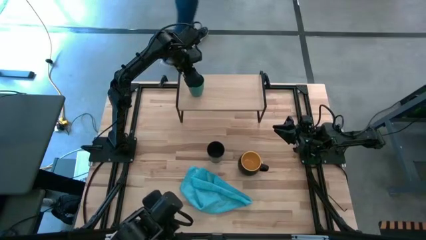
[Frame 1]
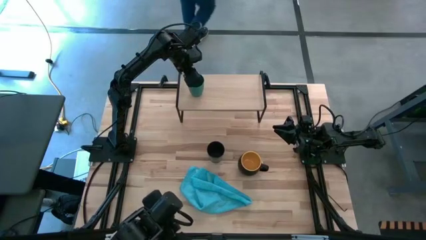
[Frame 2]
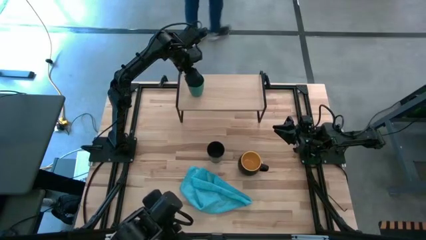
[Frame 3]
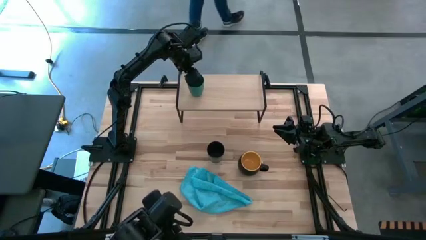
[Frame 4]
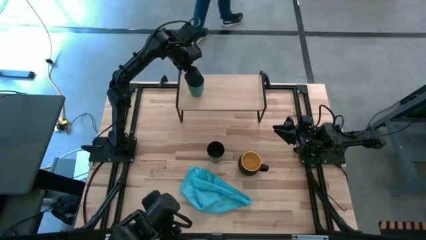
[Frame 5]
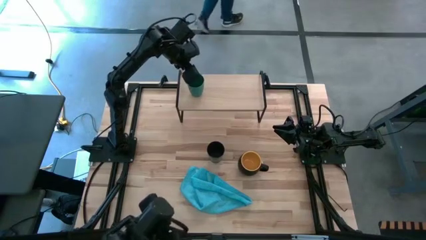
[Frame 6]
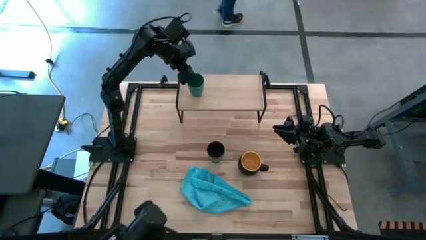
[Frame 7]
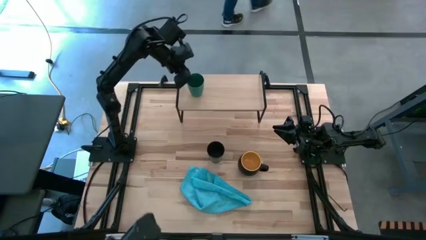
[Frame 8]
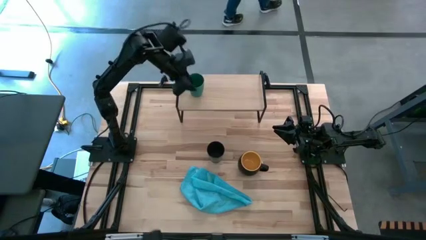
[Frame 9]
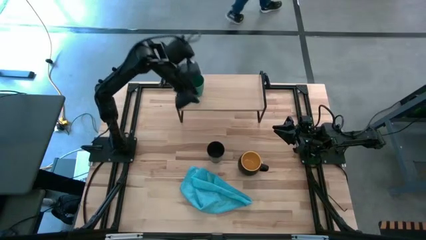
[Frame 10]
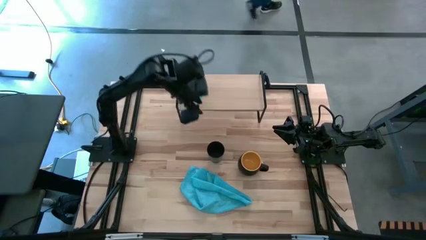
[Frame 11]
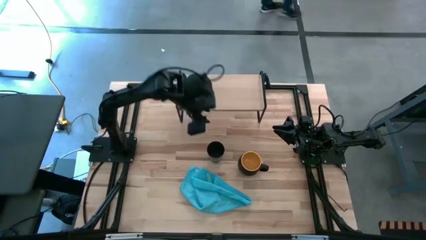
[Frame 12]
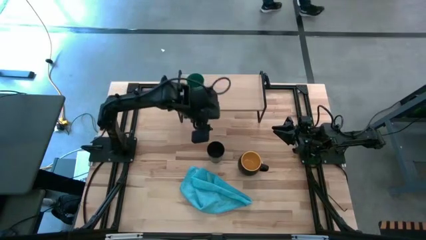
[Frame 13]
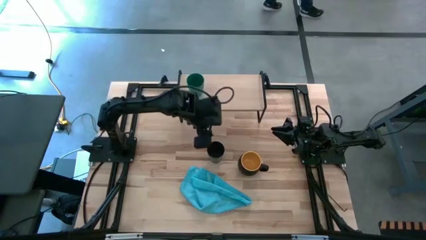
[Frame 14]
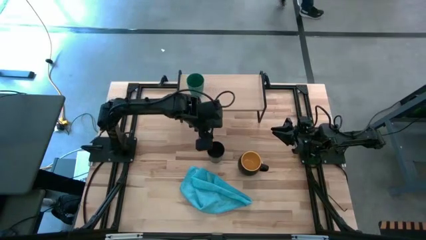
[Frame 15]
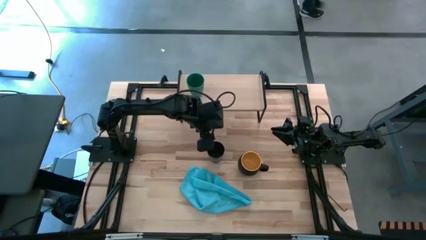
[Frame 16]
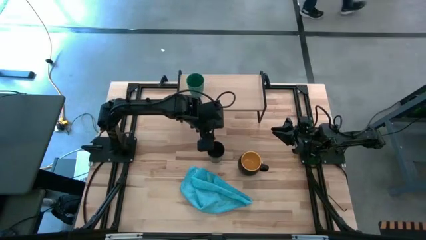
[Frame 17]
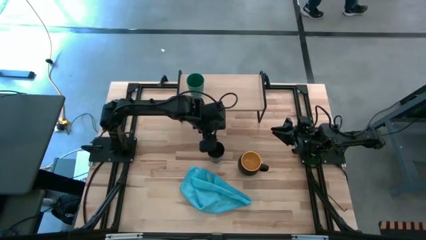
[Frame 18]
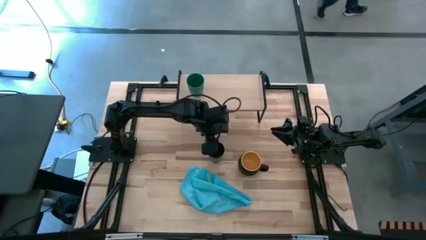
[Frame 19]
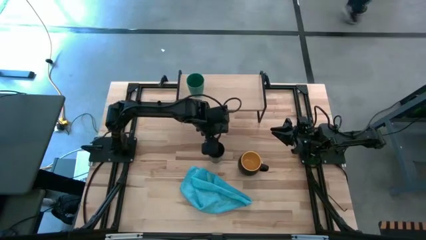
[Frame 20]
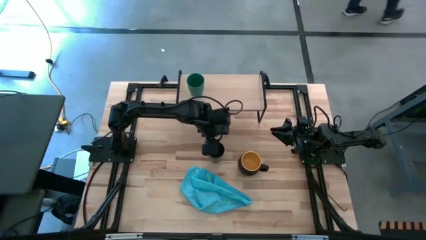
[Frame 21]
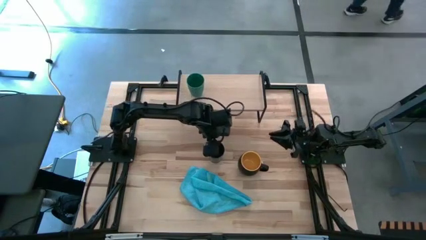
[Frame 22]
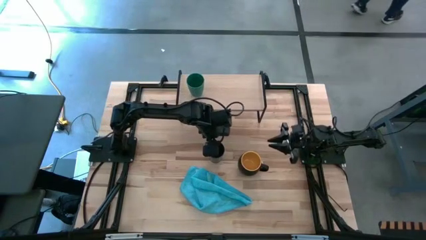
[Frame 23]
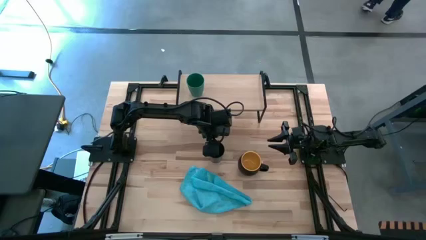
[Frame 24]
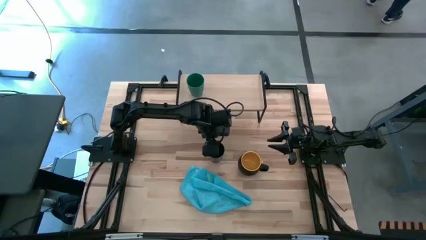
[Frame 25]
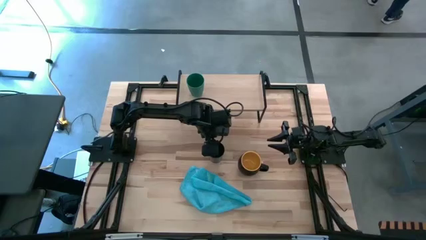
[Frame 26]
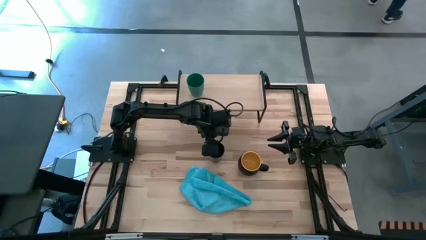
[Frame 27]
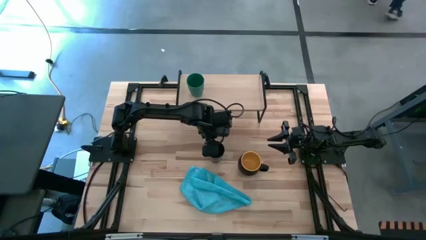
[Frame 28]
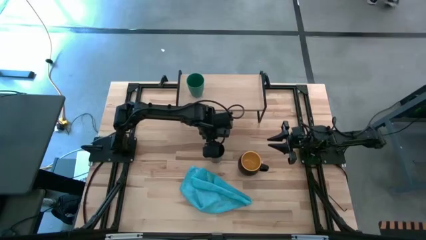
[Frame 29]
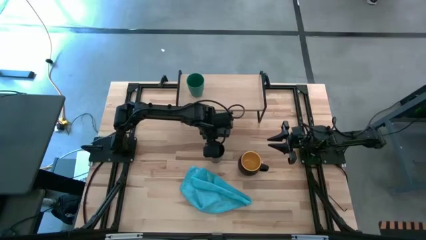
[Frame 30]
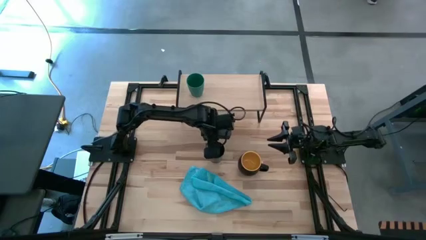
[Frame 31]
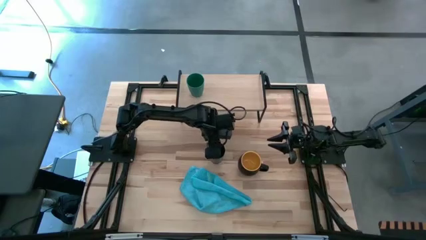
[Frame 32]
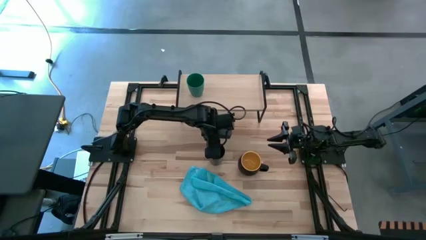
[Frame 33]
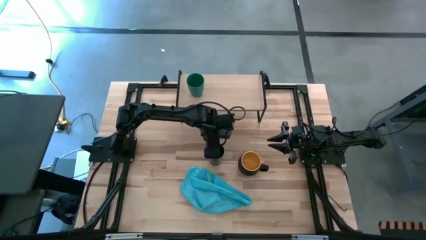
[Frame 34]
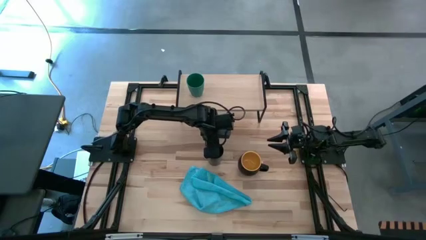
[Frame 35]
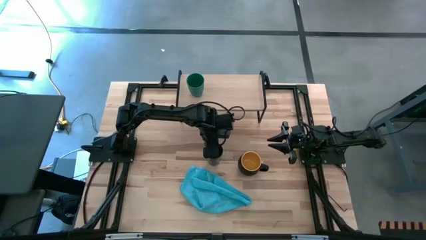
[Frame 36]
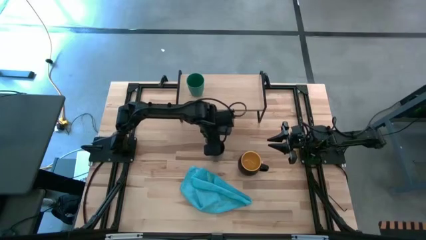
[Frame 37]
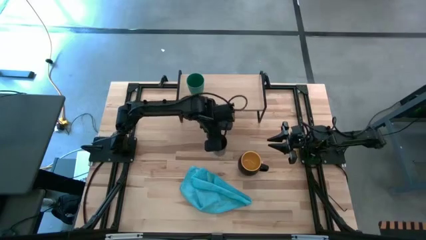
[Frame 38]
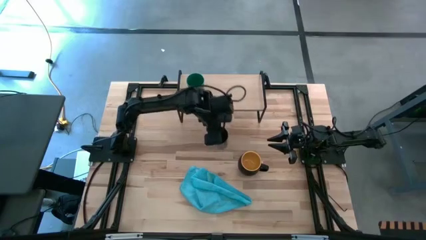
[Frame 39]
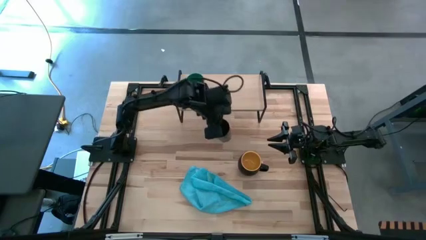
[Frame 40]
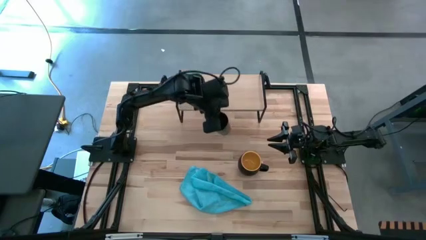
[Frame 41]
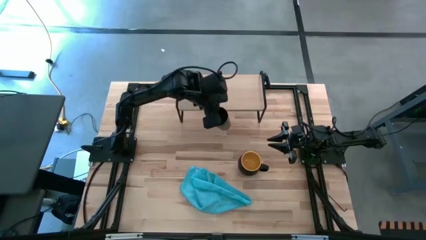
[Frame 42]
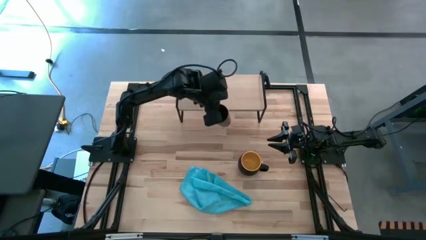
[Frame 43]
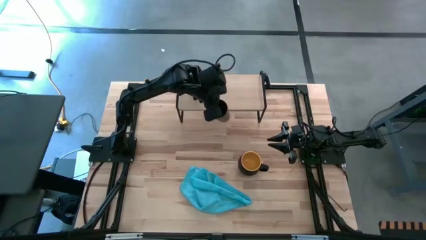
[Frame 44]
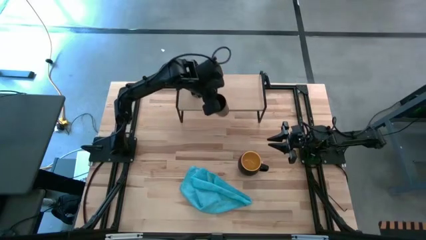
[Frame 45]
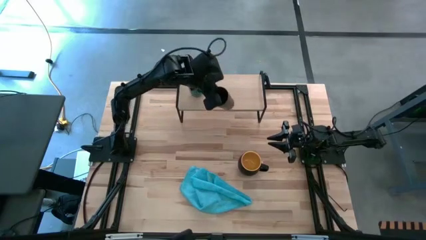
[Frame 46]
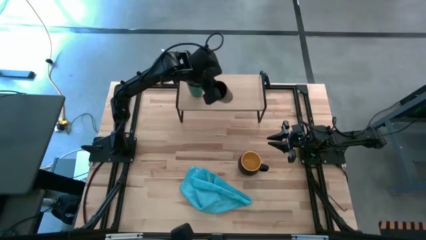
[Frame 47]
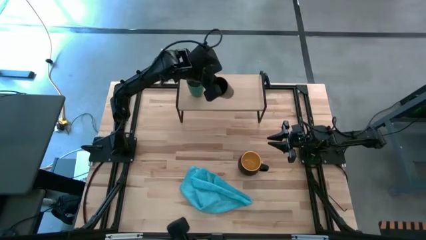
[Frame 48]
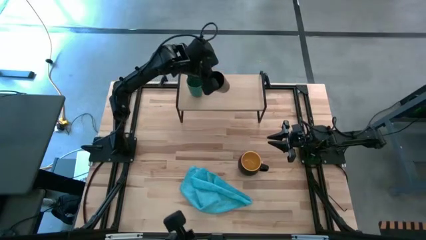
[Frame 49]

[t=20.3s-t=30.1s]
Task: Stack small to large cups/mugs on shelf
Put the black cup on the shelf

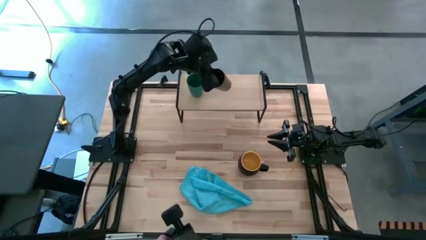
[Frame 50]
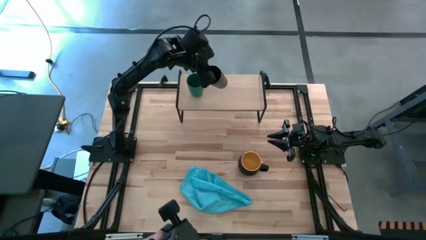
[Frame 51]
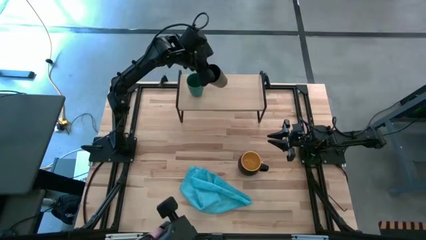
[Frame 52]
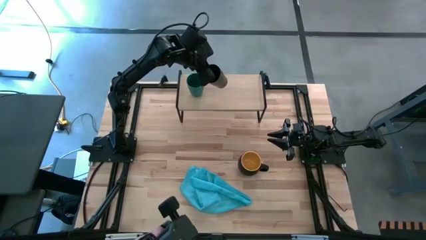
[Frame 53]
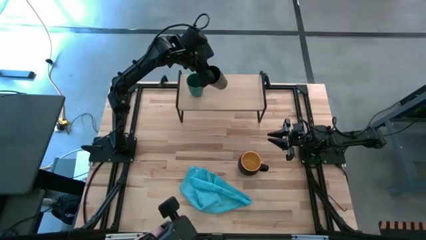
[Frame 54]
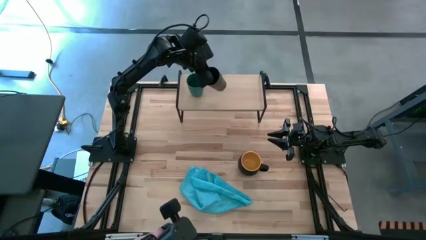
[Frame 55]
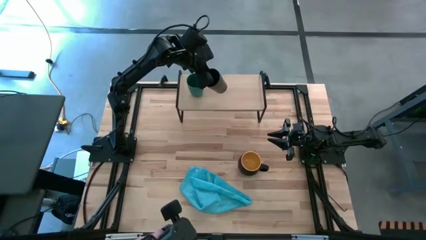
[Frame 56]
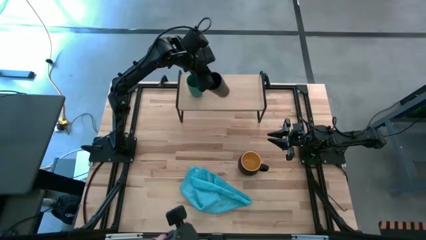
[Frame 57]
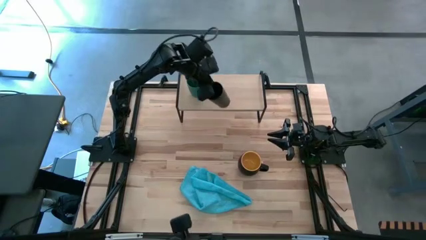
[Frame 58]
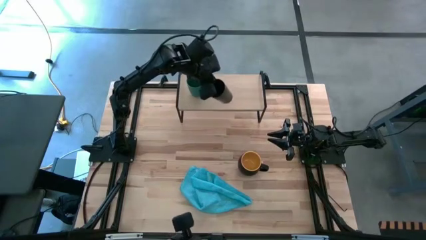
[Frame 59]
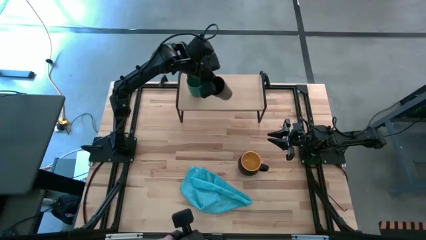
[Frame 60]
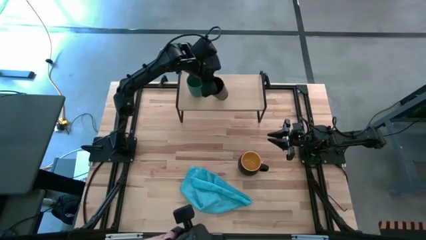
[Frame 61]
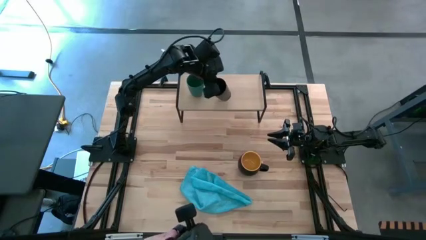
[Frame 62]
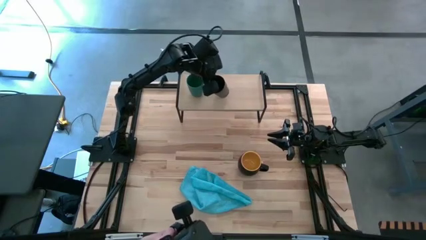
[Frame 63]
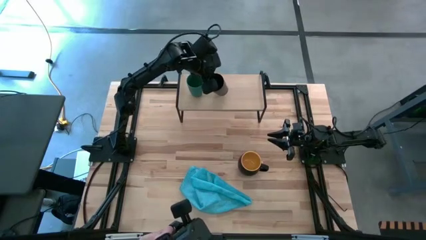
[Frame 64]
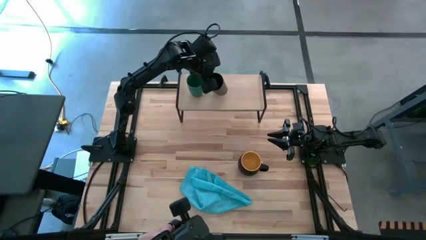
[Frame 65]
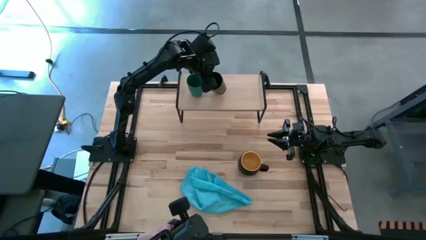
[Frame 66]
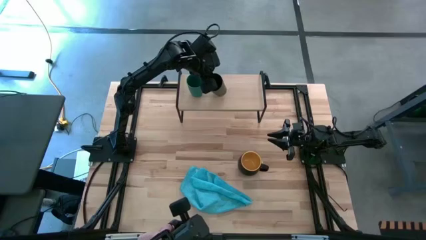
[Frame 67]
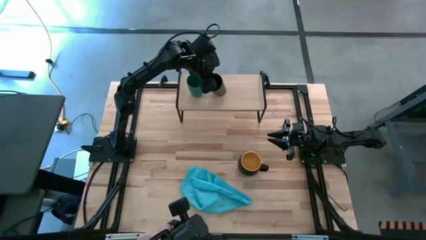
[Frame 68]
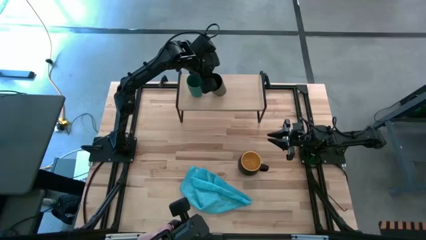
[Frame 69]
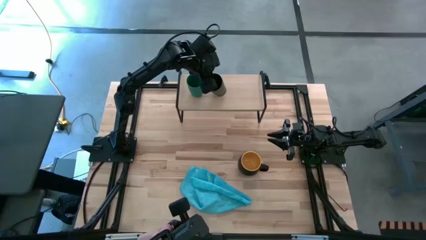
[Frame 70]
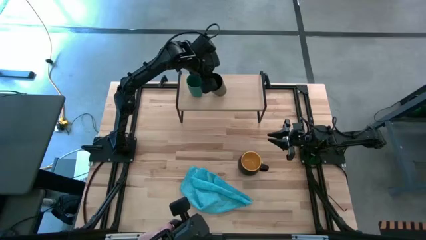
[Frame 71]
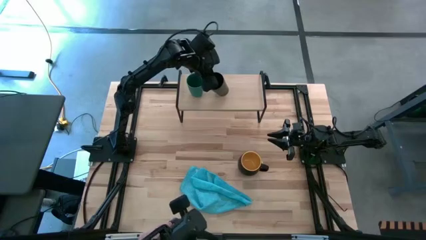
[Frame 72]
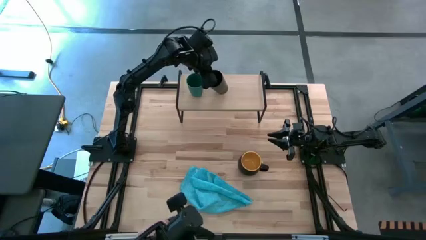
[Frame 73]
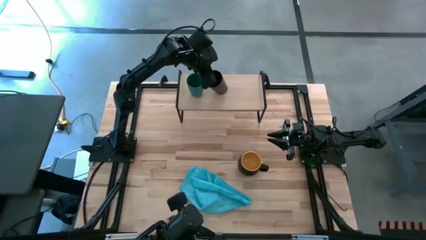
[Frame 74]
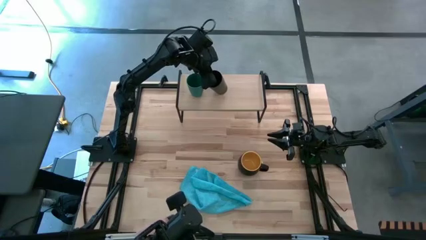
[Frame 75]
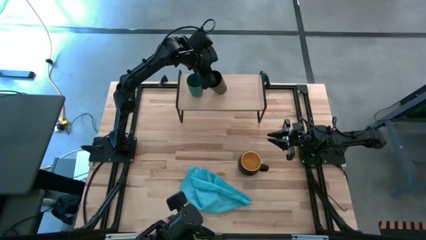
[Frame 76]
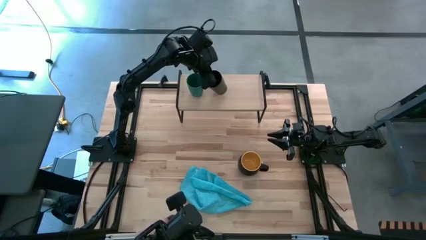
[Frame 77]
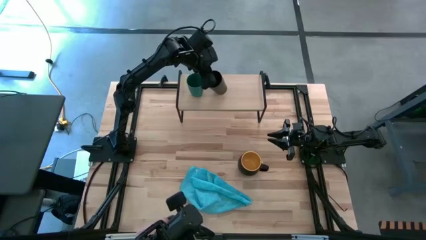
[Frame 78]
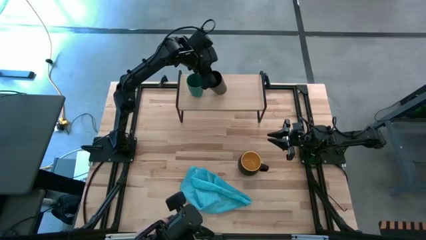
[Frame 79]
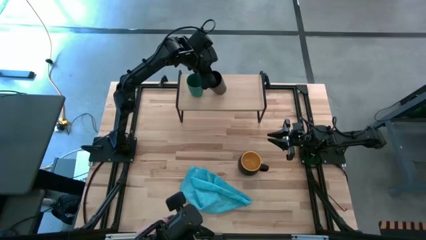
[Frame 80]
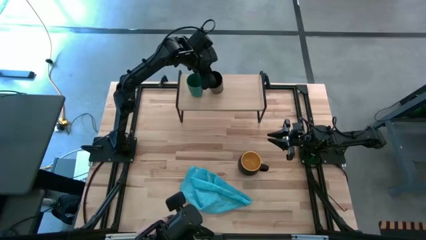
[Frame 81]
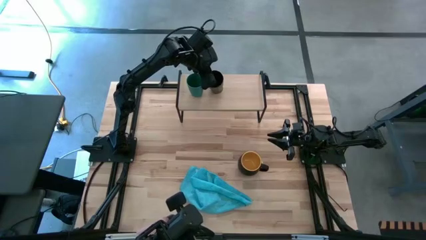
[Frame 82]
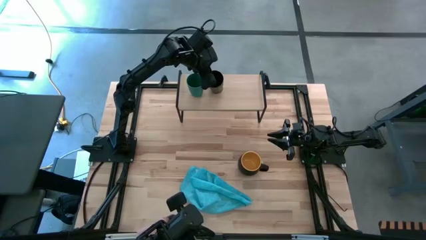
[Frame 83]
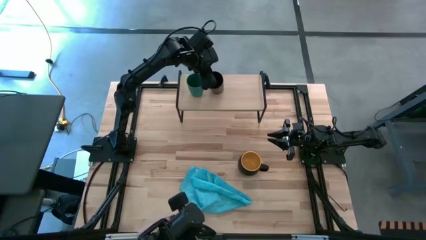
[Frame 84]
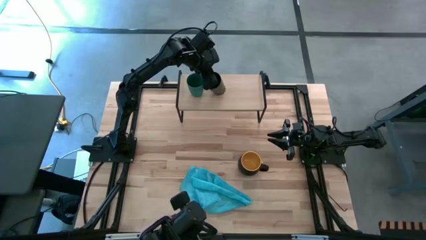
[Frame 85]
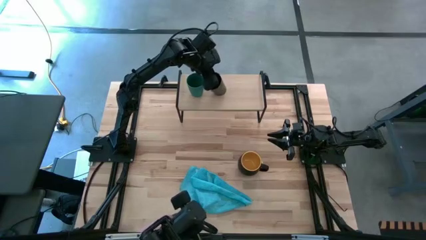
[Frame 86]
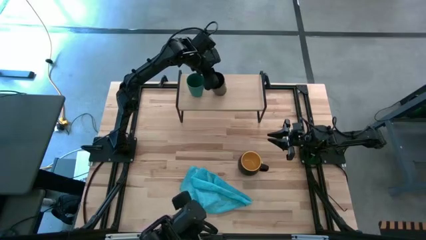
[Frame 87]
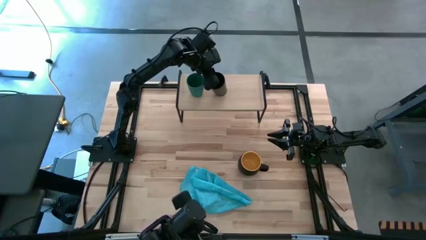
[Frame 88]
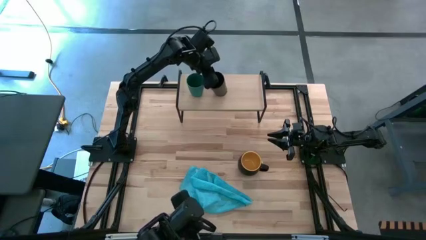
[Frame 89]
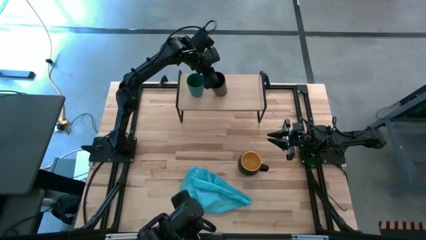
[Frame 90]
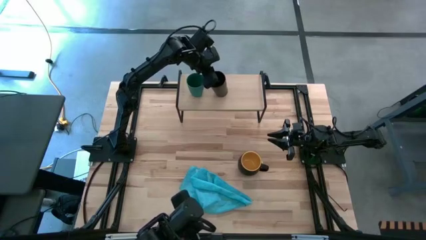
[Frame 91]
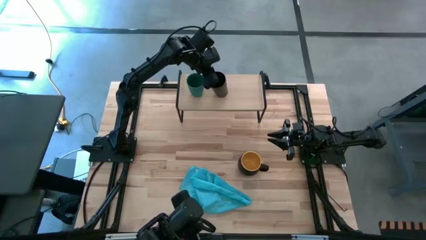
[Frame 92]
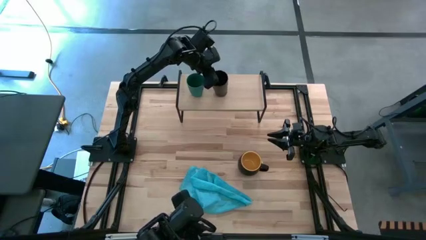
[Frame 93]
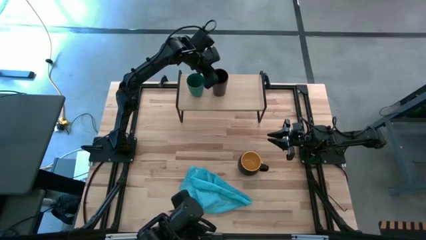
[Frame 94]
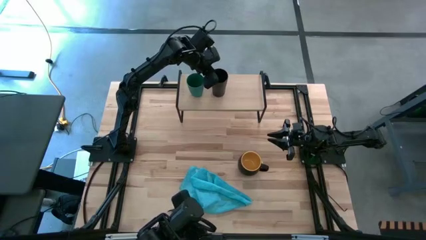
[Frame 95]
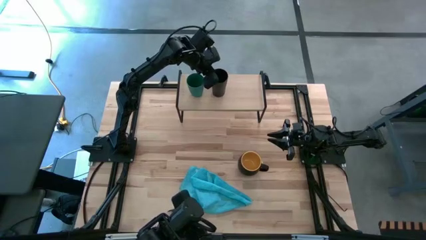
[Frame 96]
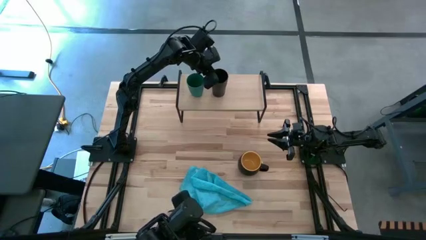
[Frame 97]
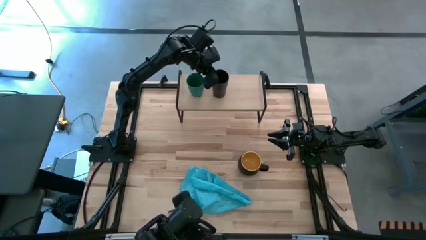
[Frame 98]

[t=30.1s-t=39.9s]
Put the black cup on the shelf
